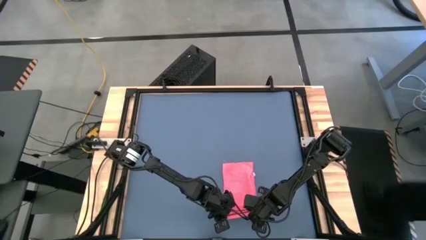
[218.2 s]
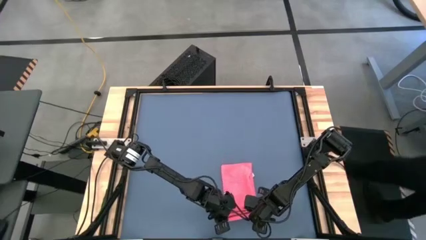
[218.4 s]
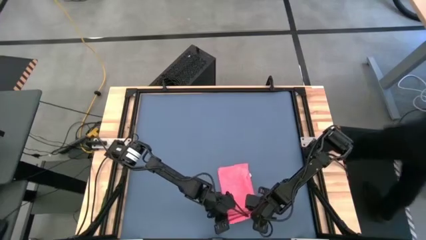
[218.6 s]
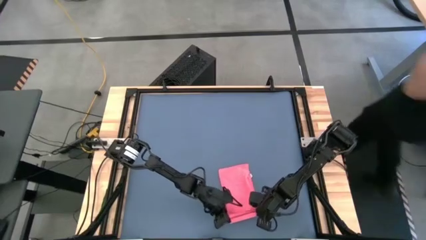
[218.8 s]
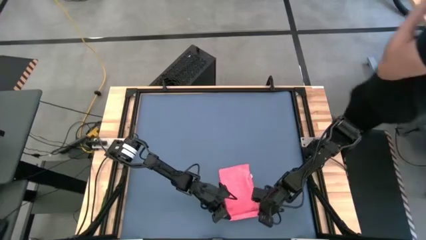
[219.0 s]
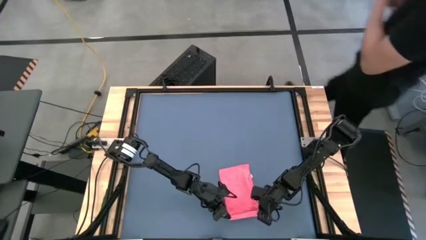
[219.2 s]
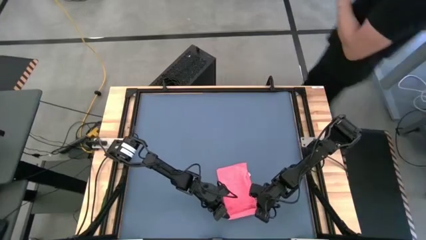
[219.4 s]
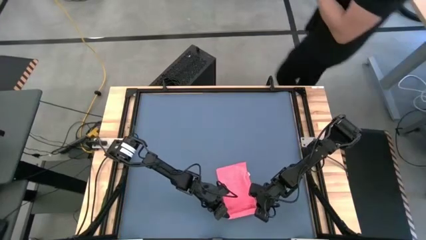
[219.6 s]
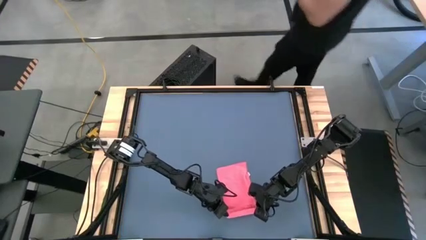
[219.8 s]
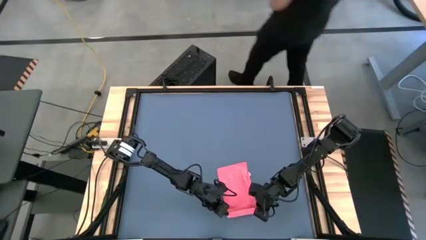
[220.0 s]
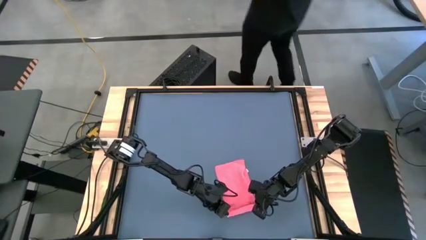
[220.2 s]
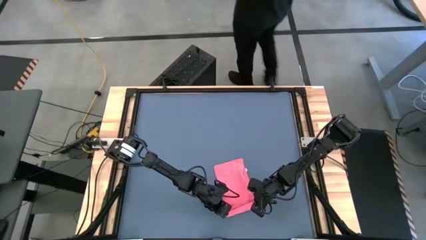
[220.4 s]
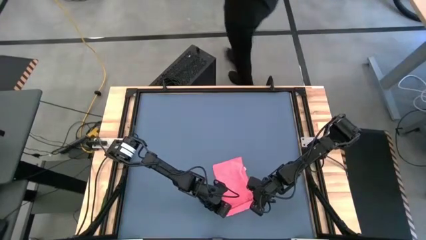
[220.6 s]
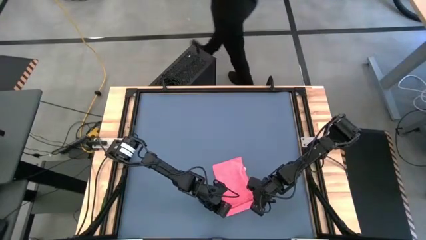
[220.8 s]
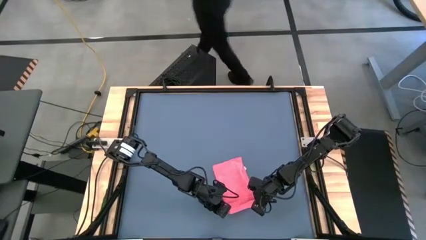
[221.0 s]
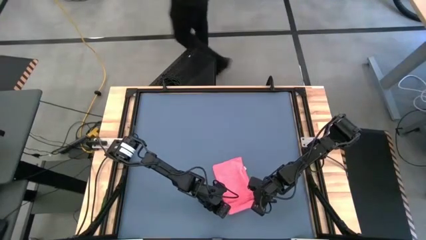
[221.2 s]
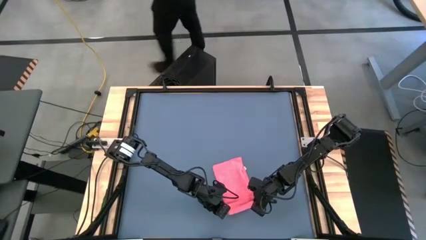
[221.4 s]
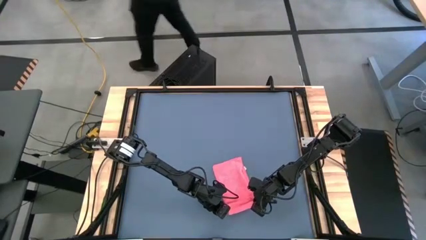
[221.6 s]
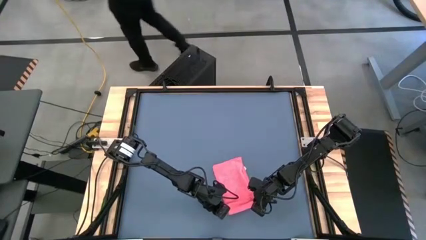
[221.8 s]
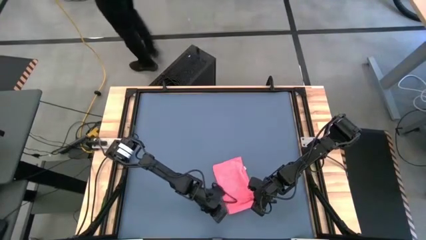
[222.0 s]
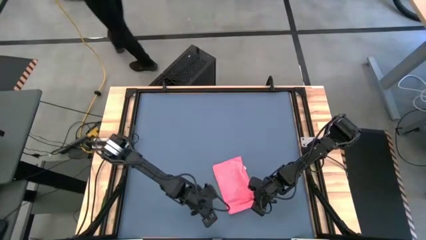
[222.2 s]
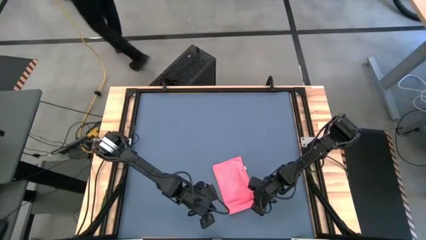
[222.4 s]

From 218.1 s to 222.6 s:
Task: Roll towel
Roll the pink microfiber towel

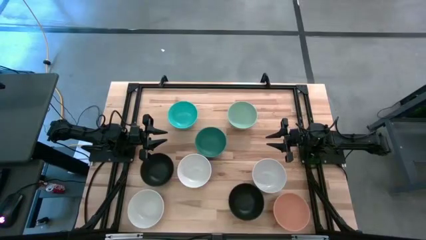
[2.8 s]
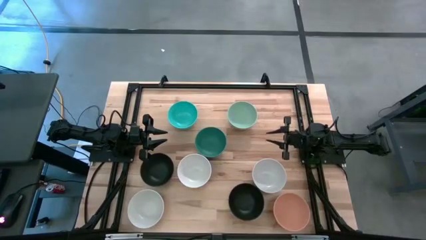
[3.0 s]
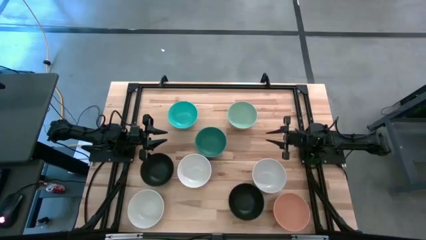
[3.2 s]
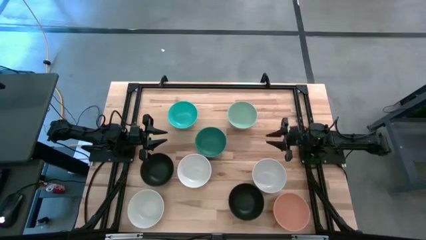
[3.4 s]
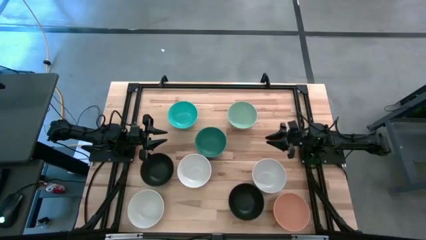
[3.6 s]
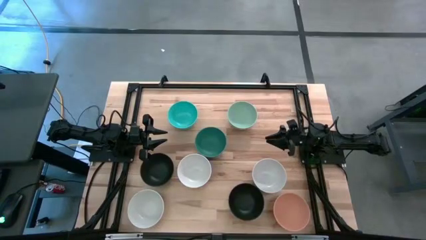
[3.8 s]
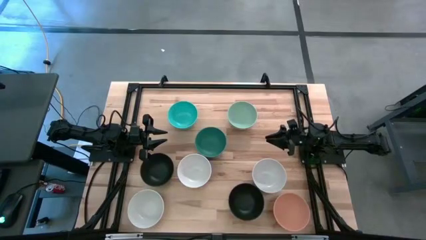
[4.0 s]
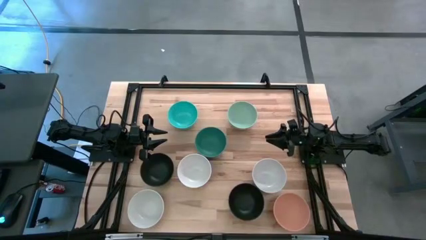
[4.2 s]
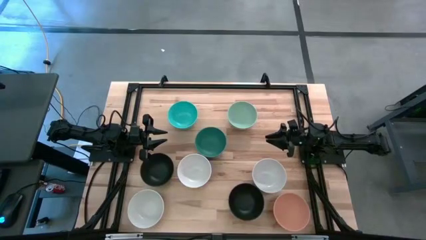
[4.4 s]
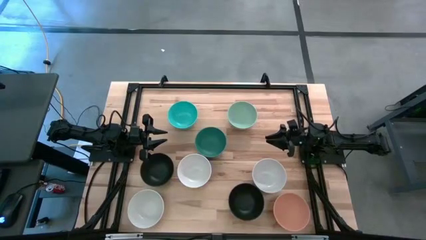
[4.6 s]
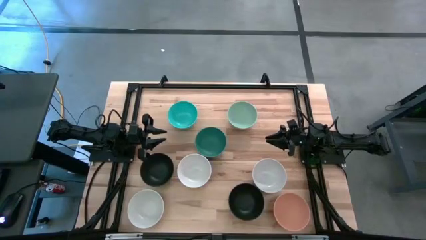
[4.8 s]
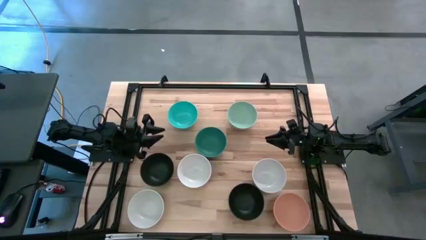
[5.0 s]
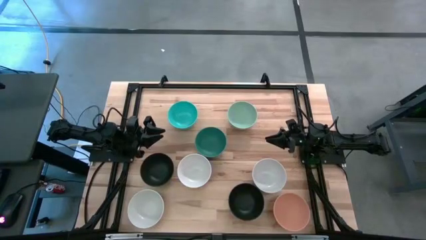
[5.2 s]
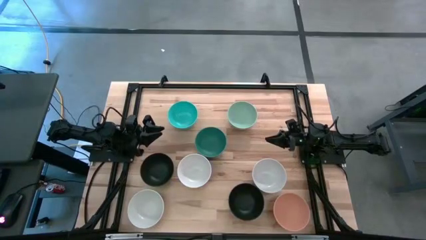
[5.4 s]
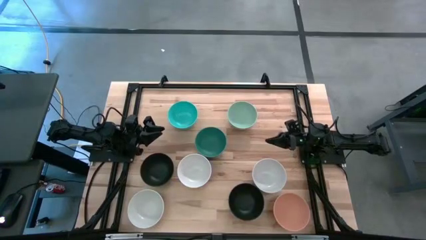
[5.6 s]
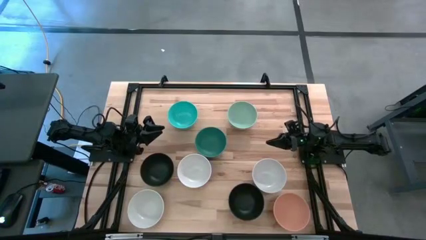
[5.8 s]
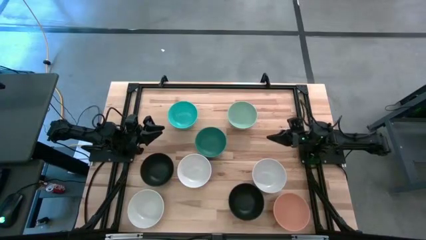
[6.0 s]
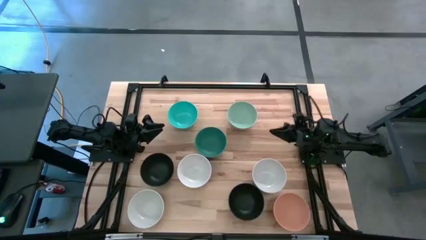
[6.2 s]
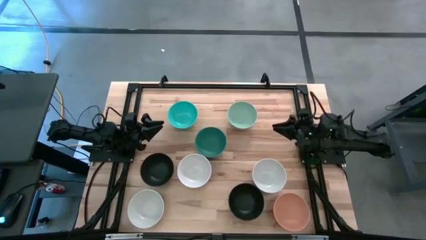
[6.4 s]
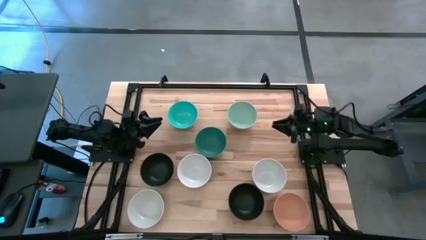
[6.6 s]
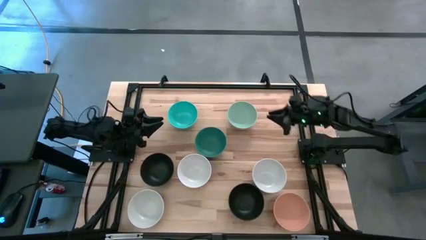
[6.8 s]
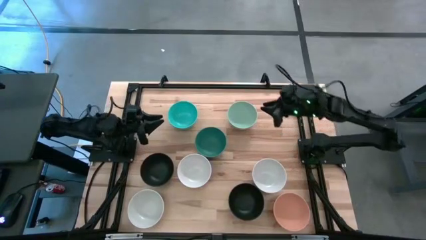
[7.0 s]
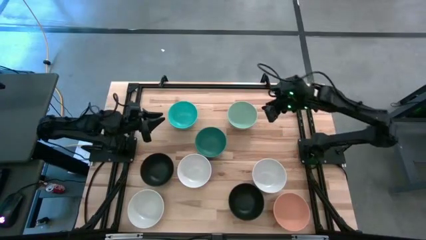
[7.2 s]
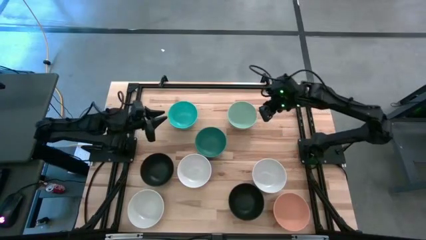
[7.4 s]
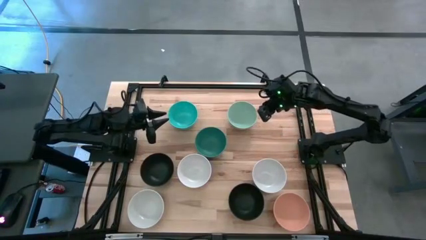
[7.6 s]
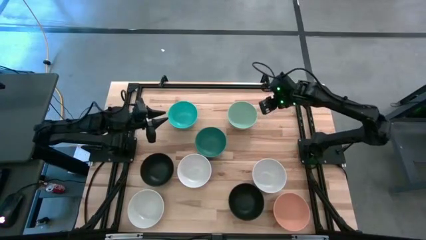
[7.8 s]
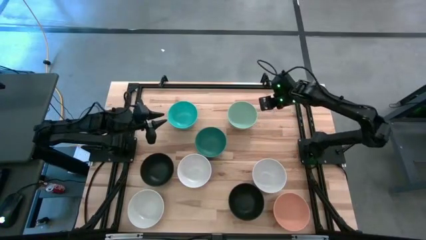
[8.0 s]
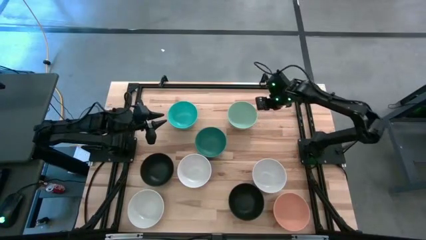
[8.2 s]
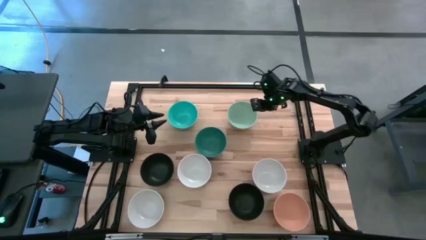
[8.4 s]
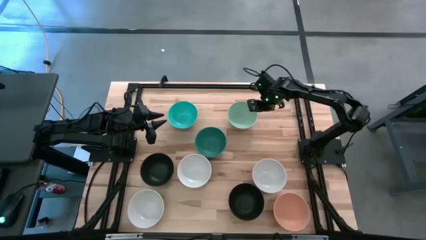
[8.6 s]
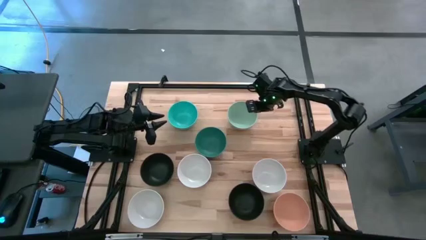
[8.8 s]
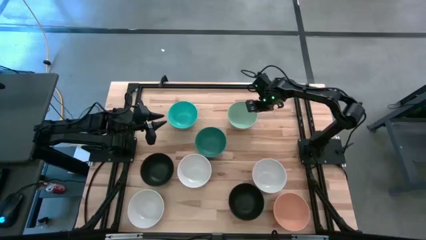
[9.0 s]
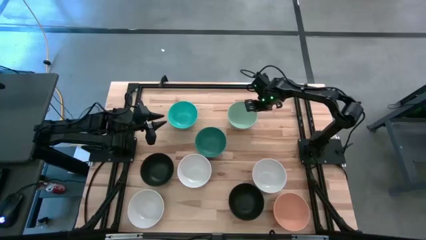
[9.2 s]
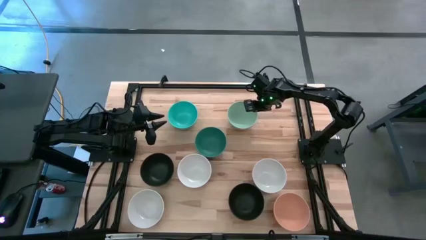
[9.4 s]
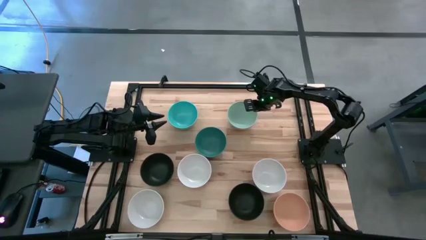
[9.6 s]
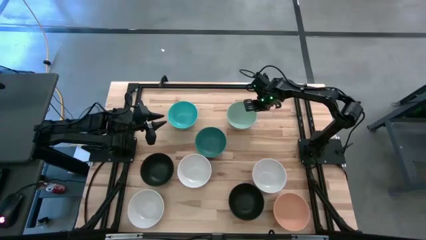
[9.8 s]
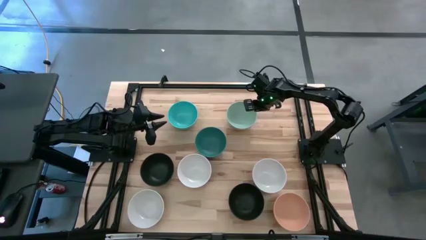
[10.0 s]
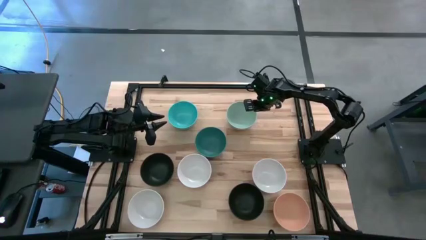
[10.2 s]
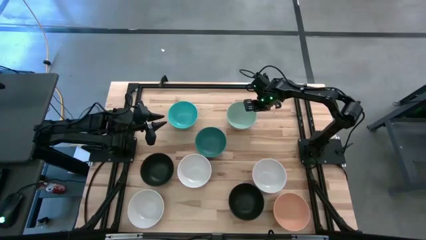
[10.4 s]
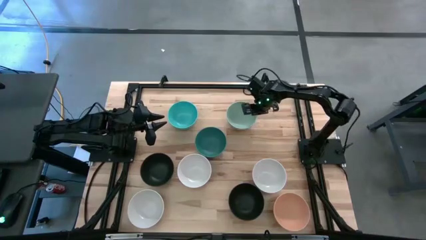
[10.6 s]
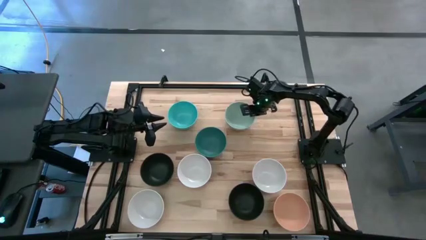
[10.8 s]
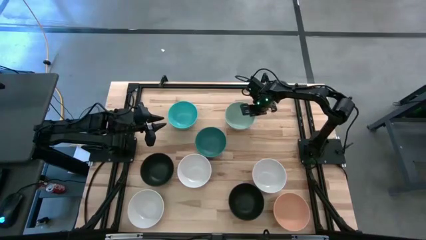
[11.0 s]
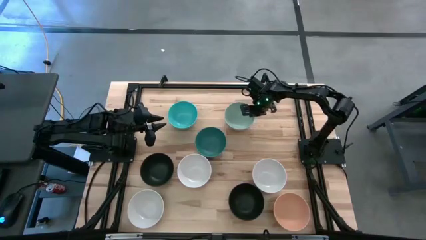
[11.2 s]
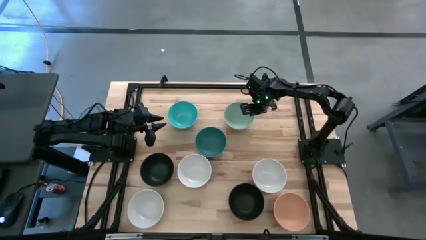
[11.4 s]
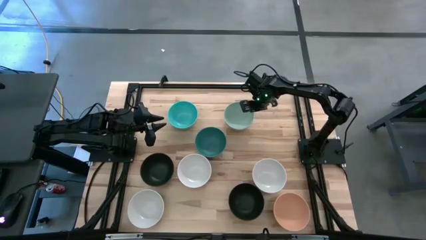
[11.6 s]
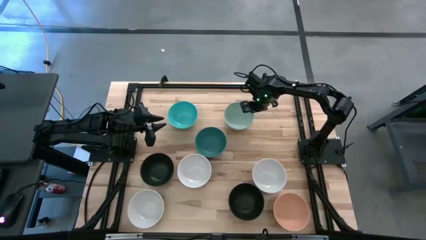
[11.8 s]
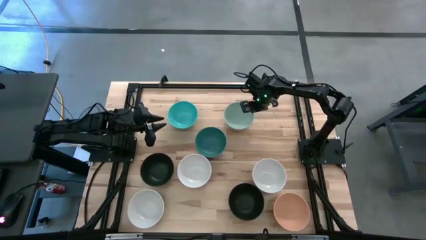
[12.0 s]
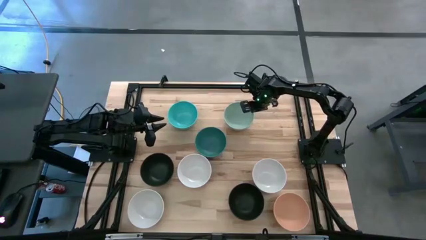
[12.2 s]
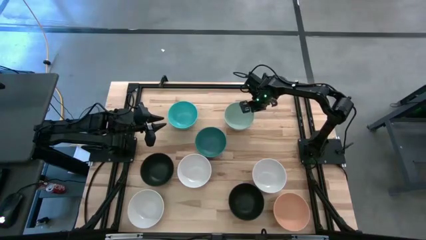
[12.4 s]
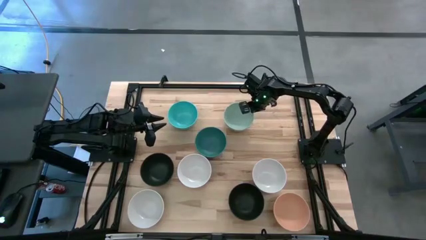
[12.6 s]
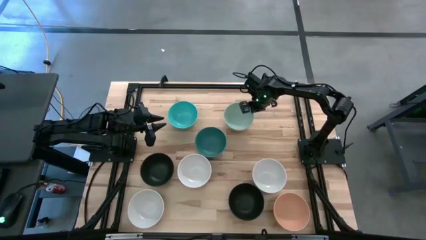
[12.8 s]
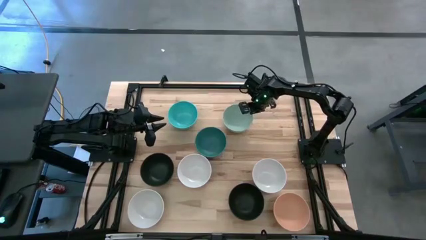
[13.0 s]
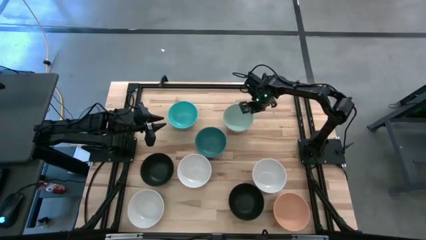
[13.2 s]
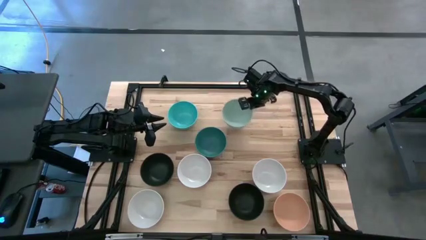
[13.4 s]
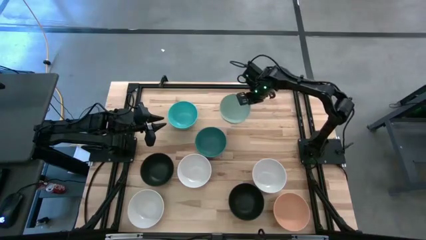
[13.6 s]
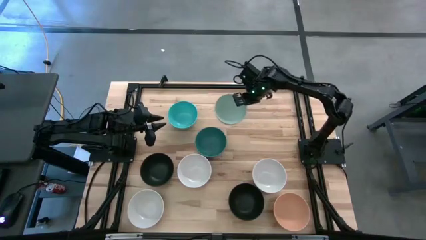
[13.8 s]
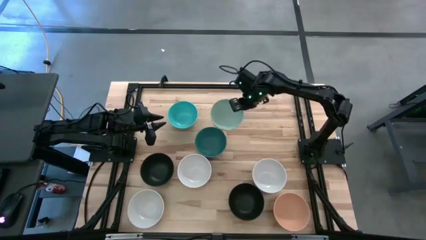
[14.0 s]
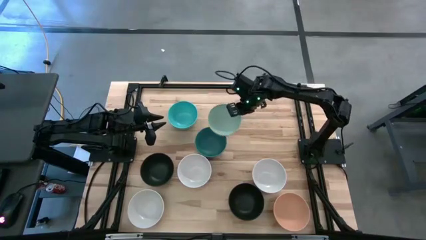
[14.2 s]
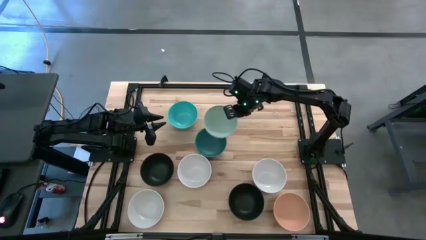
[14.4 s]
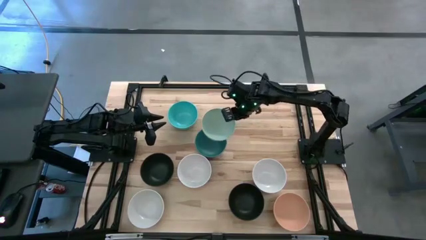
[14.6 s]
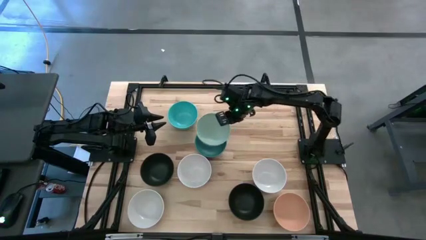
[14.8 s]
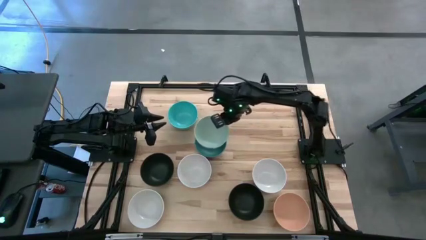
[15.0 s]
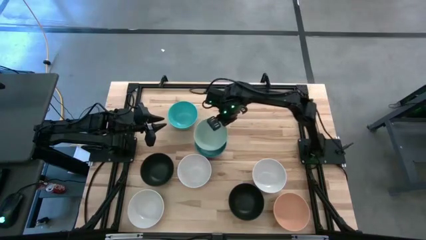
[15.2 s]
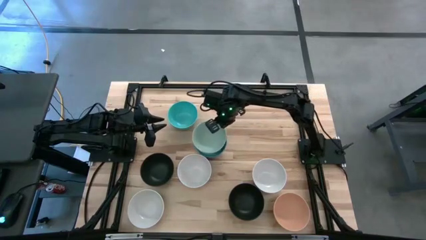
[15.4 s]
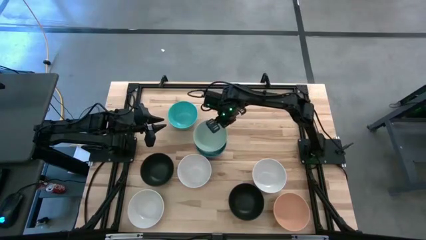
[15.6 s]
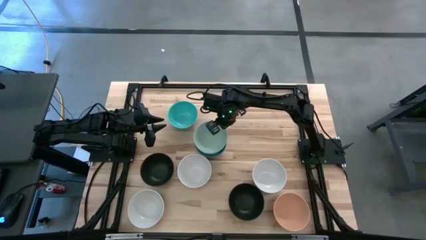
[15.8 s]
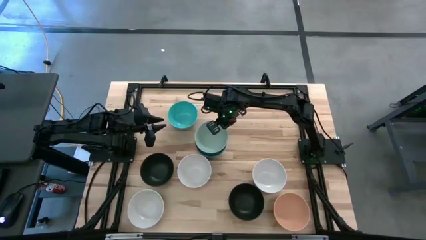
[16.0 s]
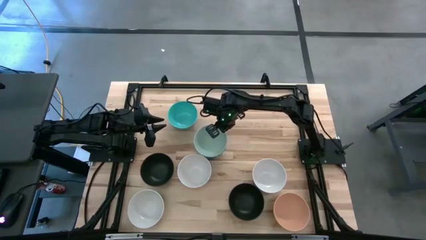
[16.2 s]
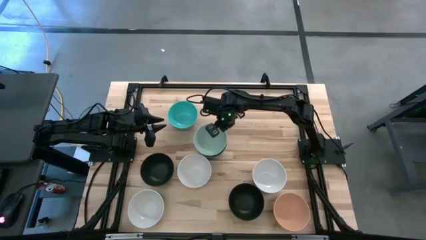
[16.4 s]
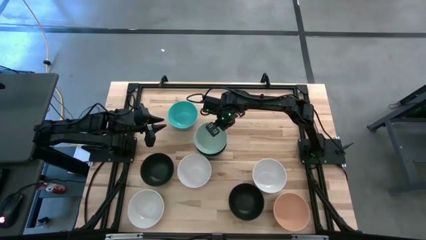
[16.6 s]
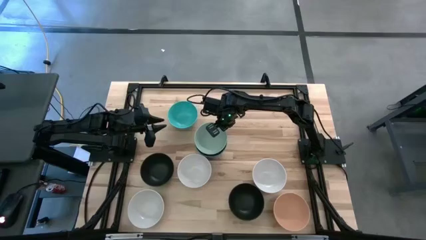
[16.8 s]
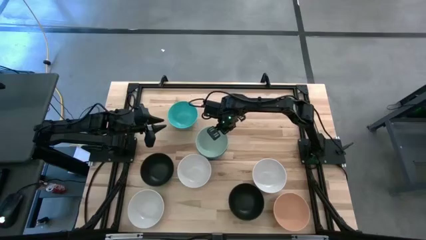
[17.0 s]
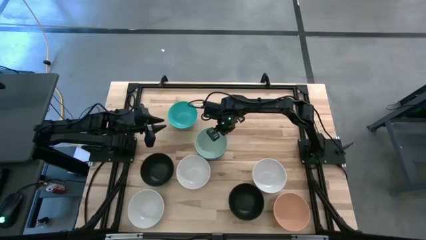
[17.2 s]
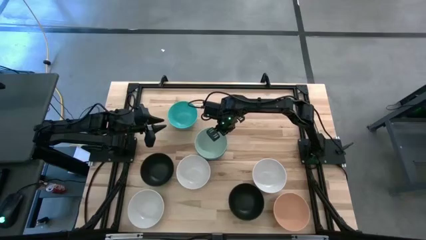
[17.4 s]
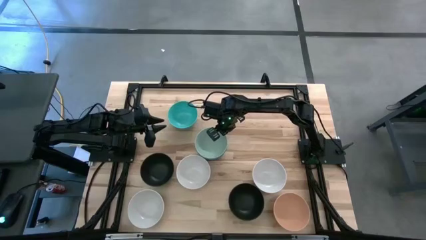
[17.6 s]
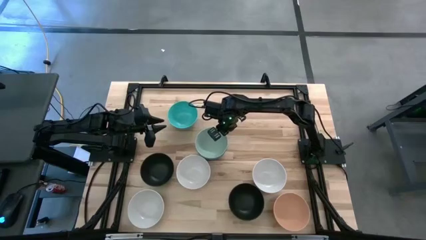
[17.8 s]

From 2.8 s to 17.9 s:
Task: Nest bowls inside each other
Stack the green bowl on the green bowl
